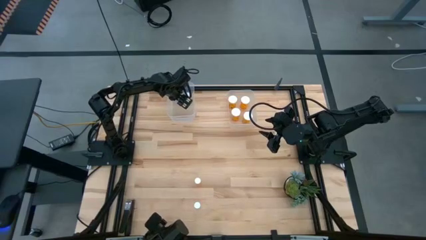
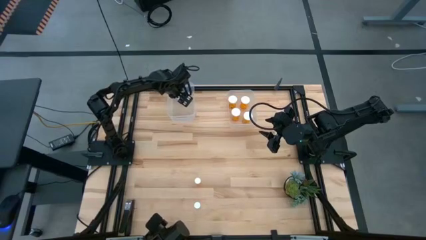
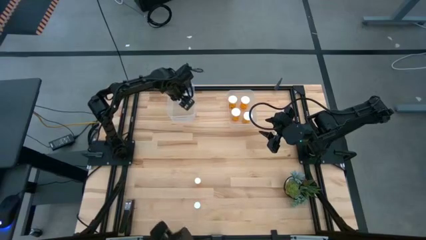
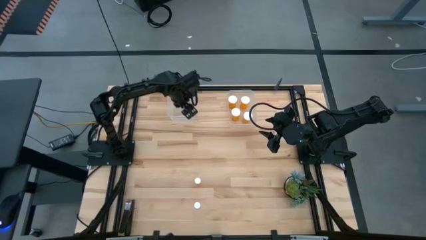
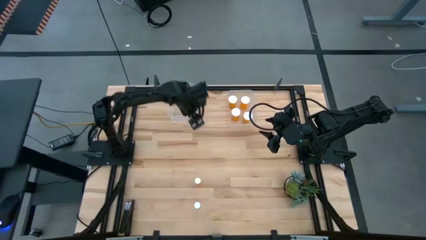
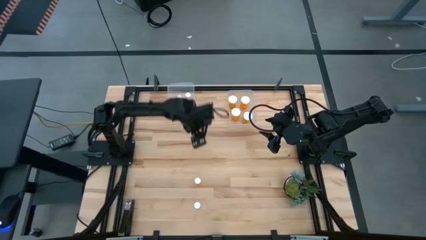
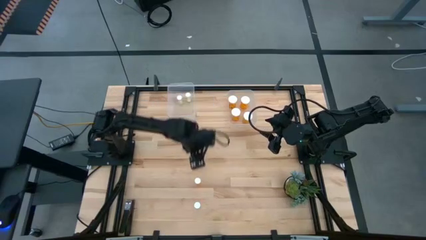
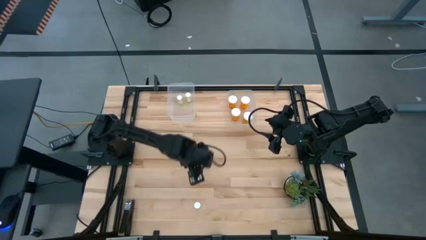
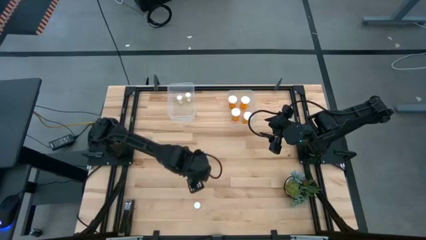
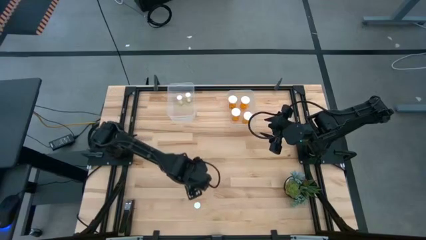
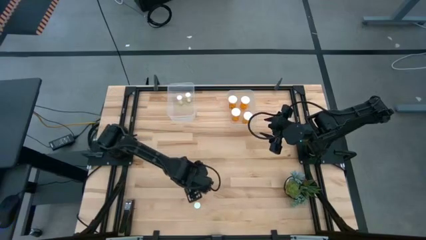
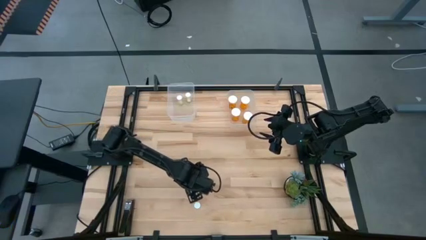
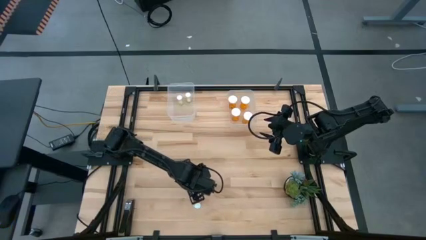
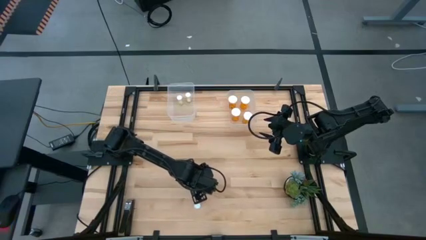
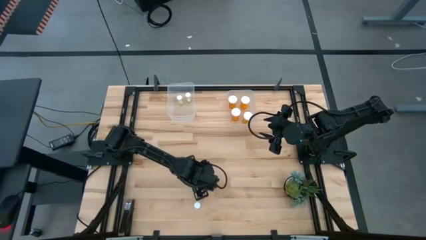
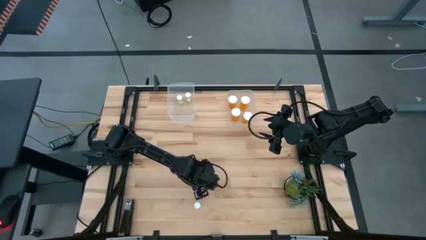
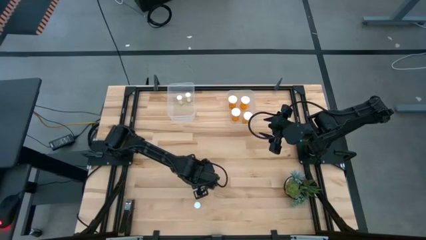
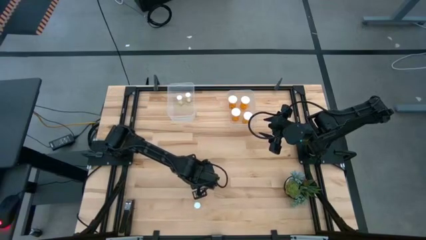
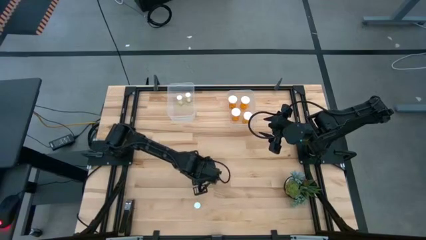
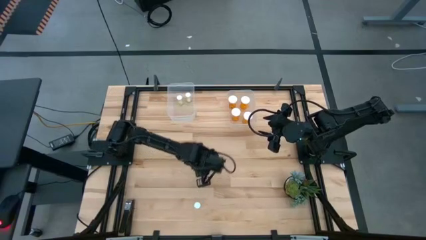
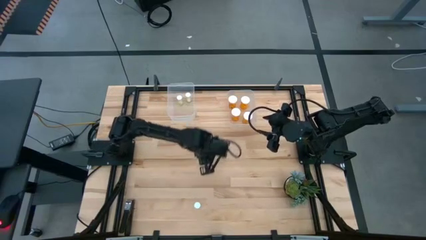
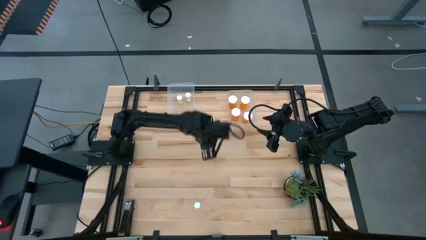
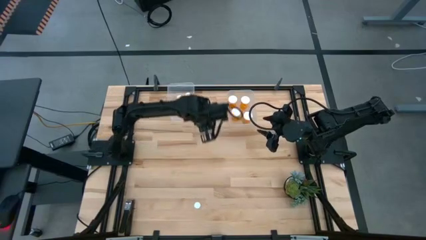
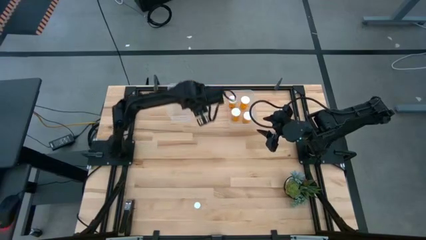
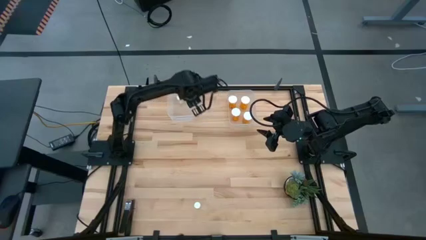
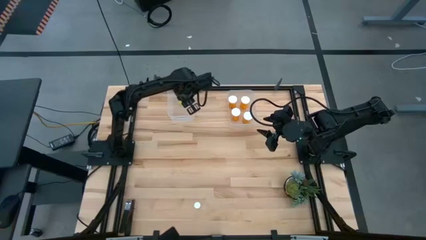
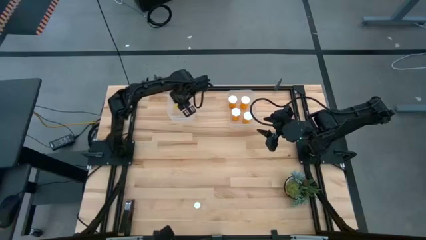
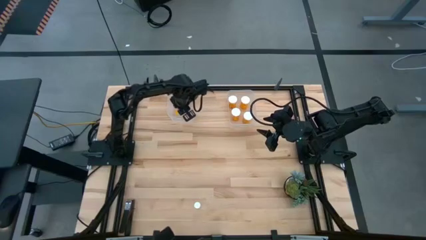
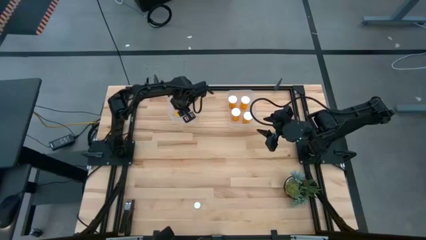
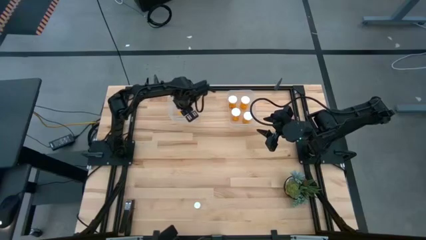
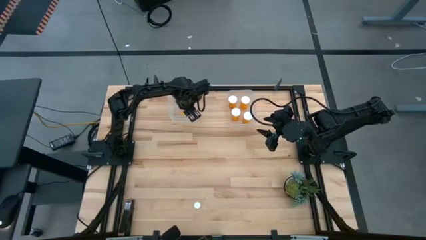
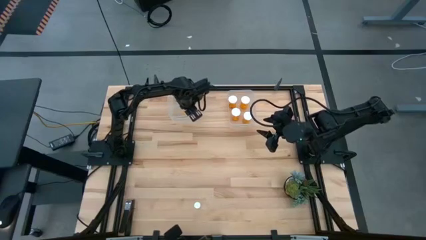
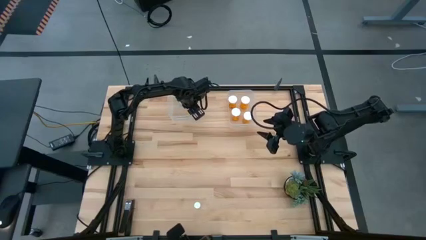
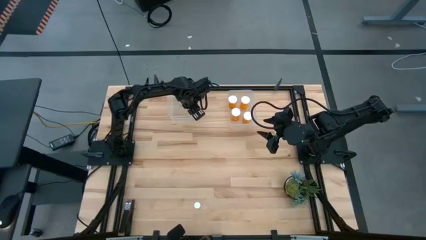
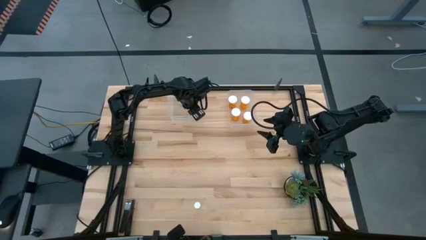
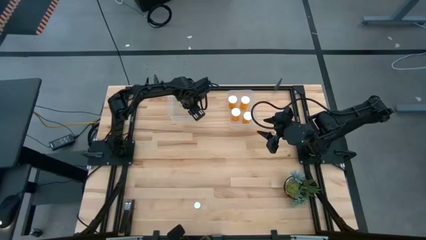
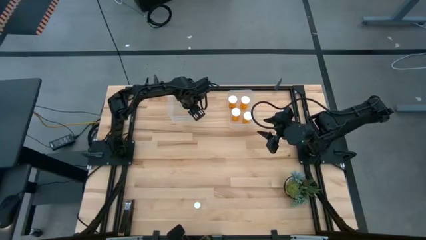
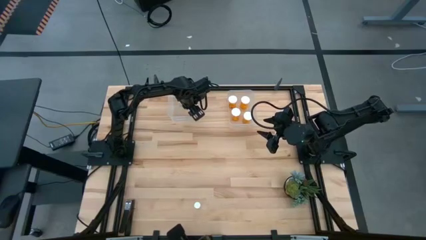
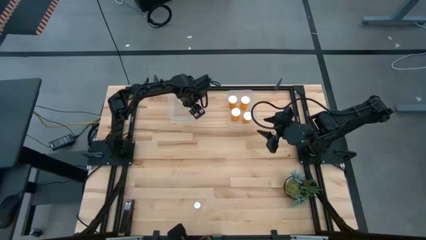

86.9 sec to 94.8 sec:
Task: Pick and place medicine bottles into bin by pill shape (circle, oval)
Put the small orange pill bottle into the left transparent bin

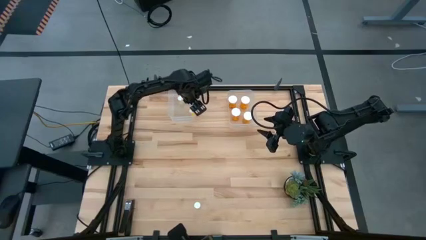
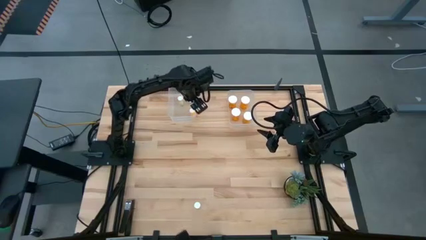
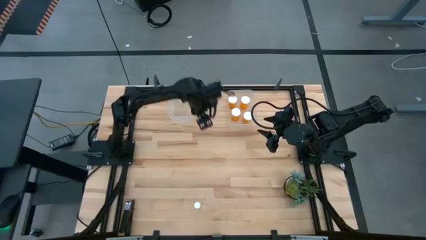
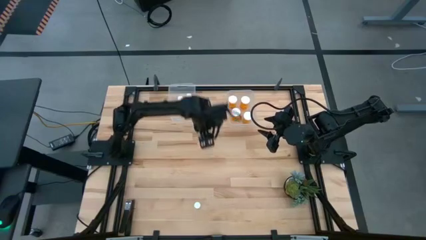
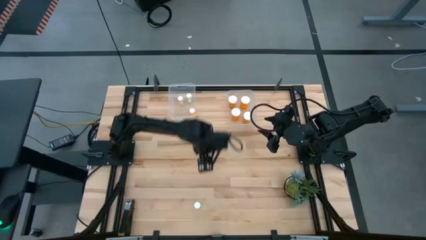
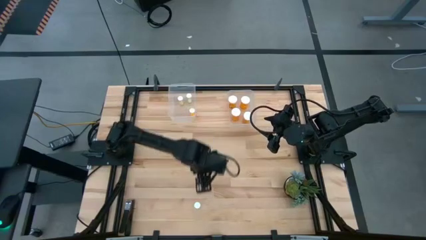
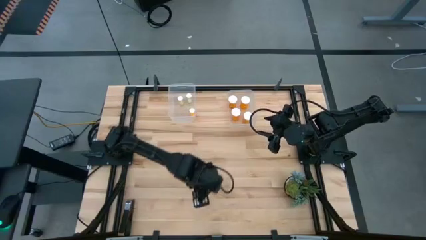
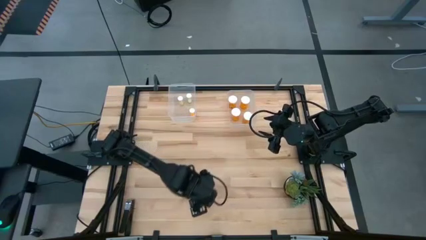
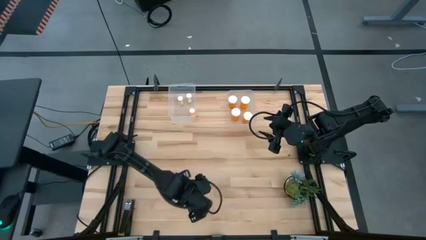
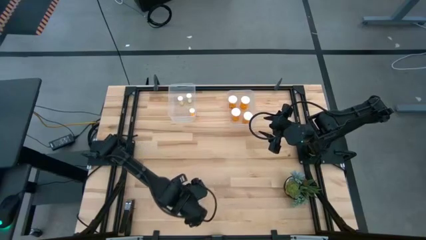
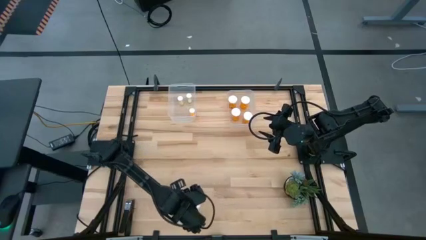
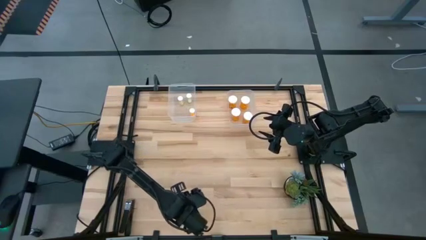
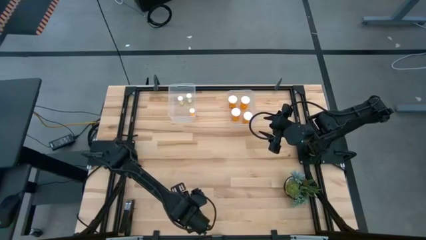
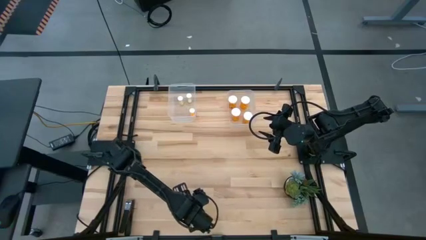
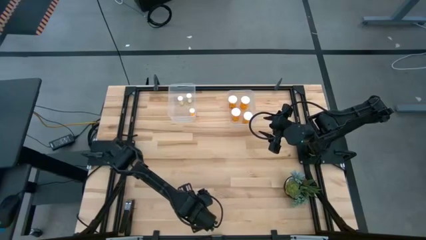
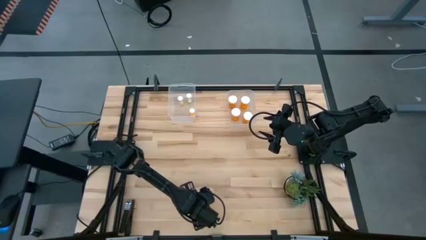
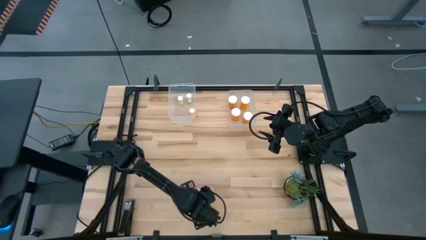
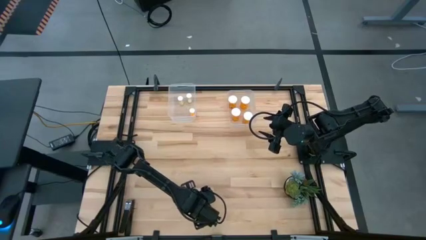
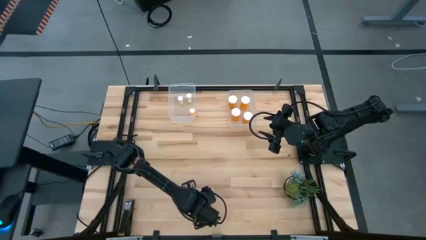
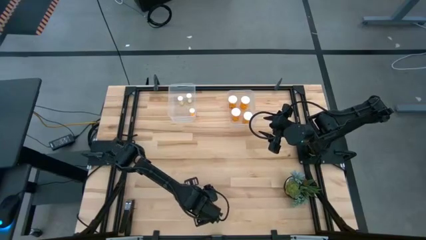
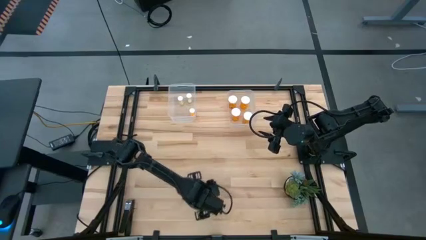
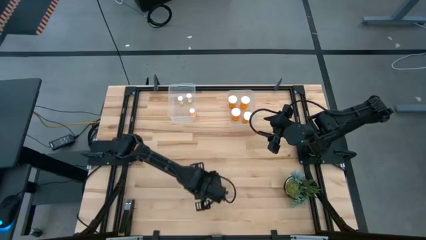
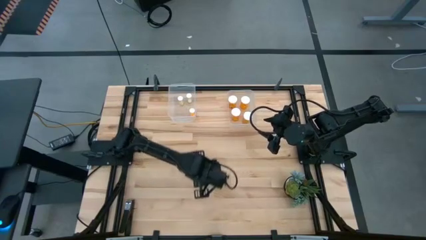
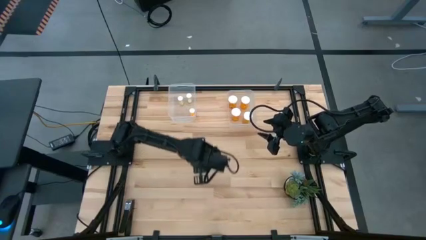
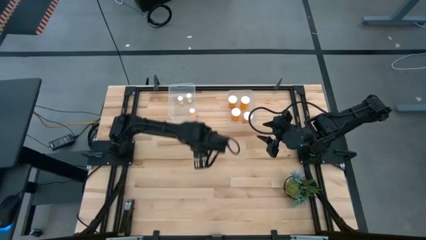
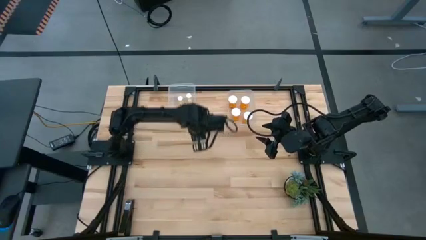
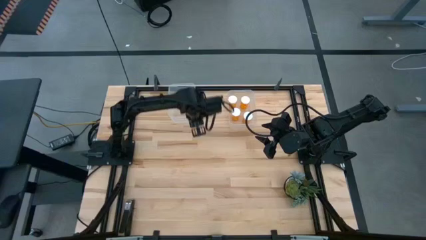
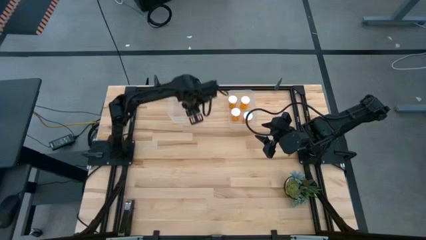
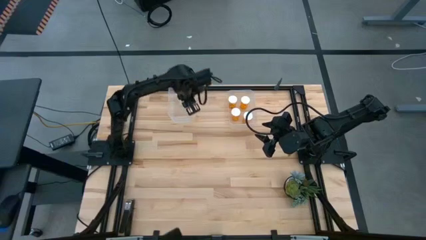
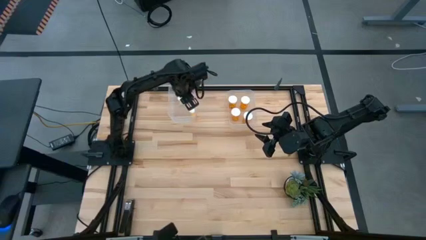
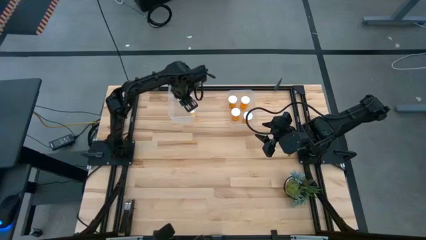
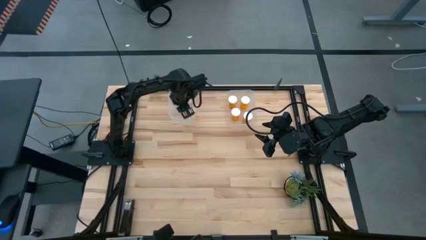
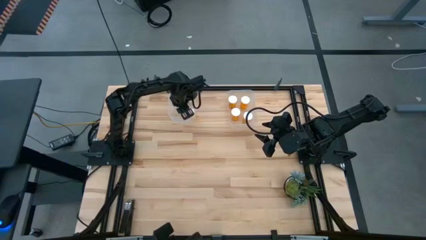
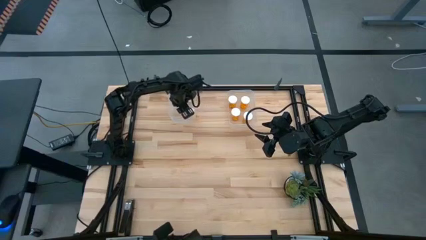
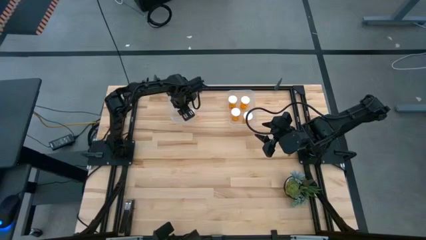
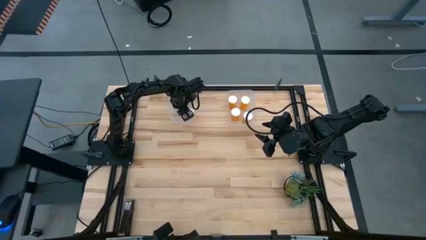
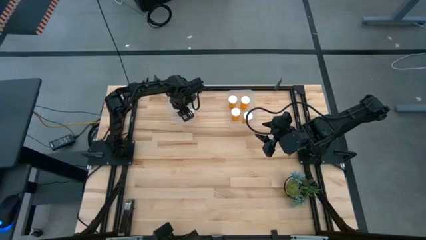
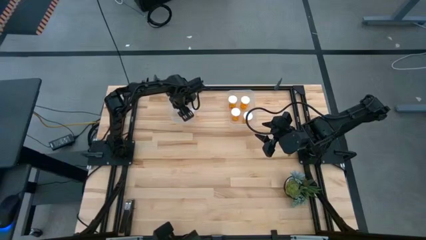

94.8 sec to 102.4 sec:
Put the yellow pill bottle into the left transparent bin
